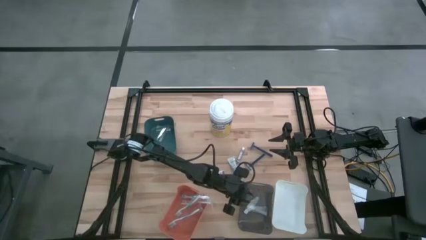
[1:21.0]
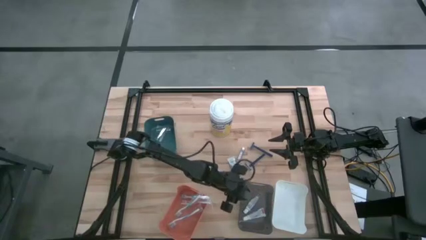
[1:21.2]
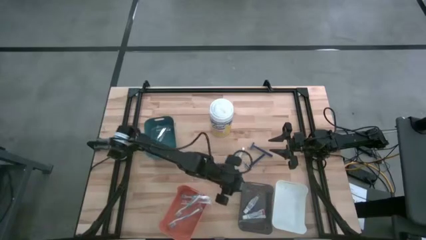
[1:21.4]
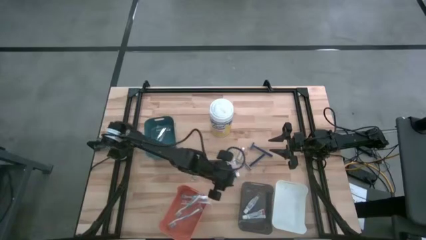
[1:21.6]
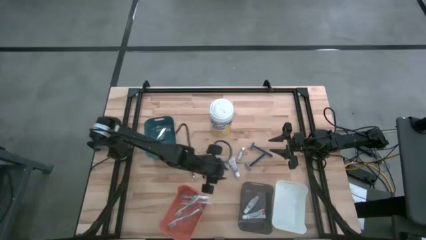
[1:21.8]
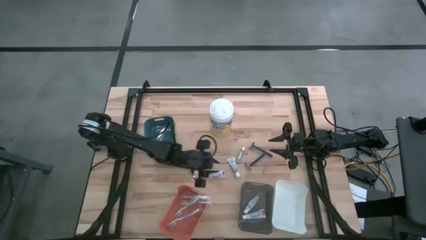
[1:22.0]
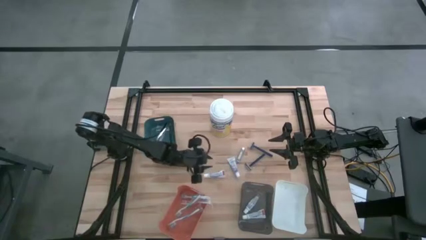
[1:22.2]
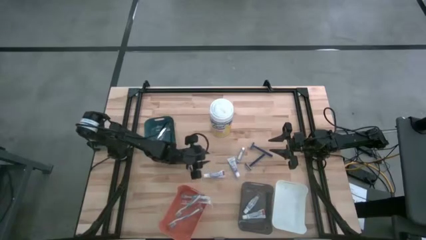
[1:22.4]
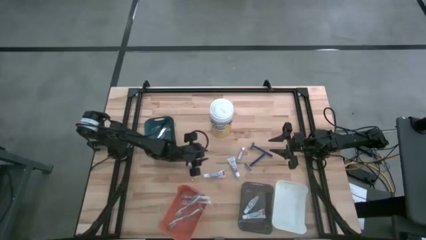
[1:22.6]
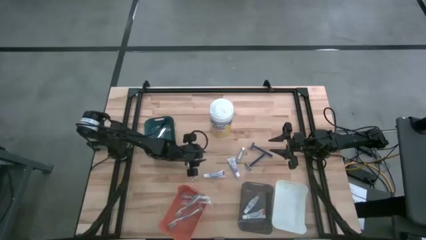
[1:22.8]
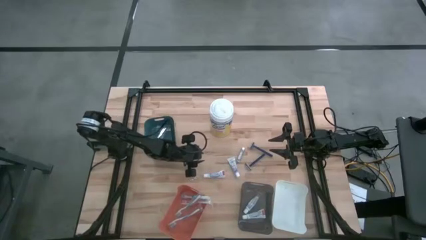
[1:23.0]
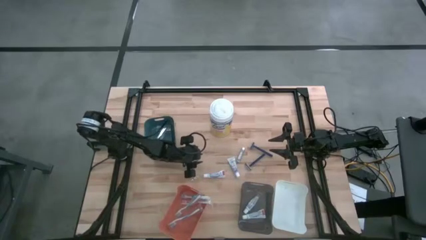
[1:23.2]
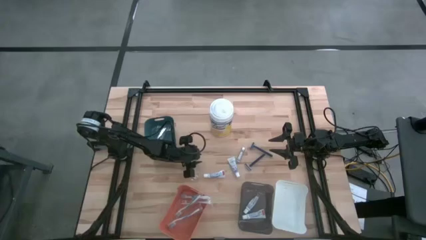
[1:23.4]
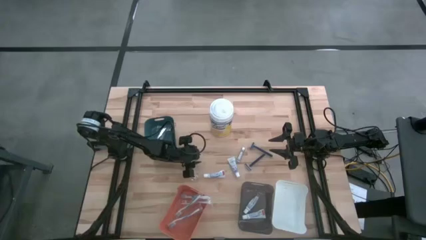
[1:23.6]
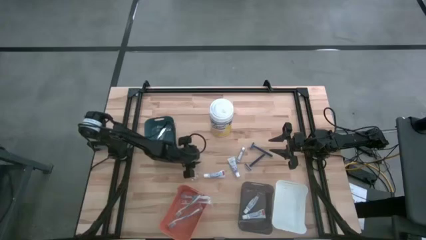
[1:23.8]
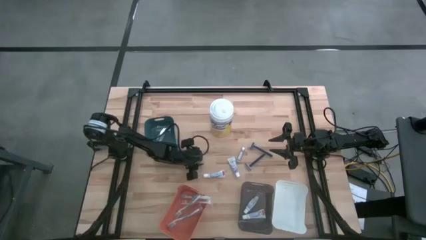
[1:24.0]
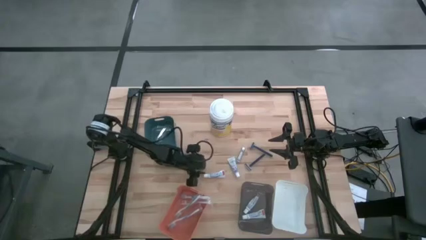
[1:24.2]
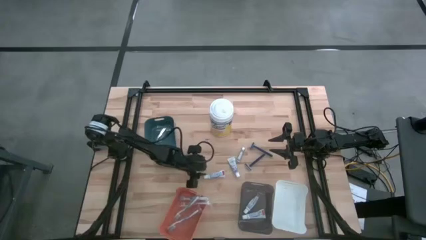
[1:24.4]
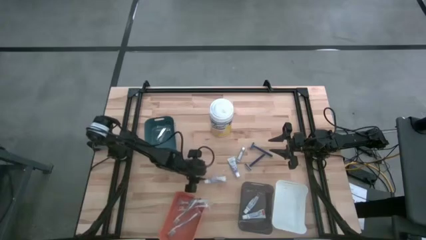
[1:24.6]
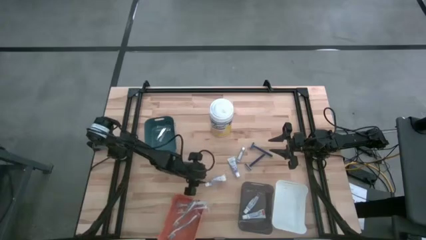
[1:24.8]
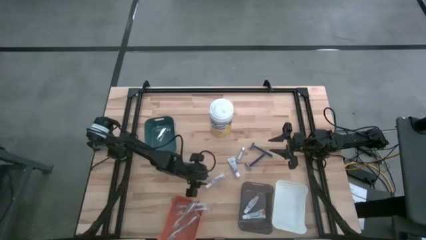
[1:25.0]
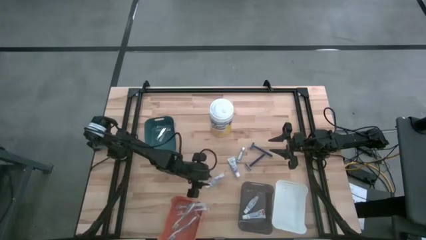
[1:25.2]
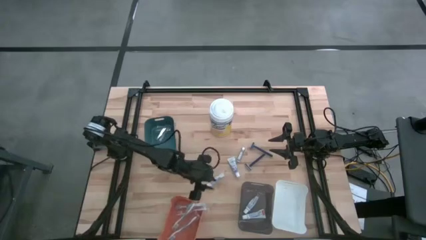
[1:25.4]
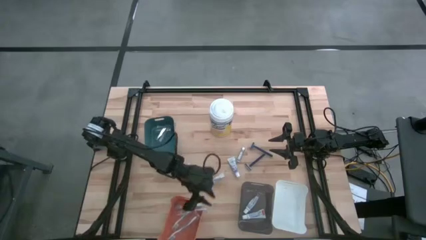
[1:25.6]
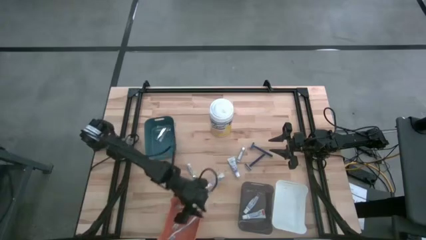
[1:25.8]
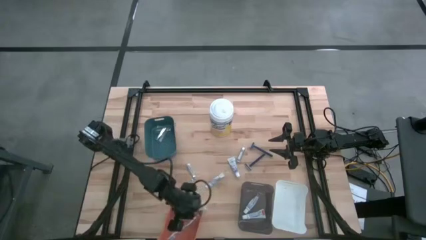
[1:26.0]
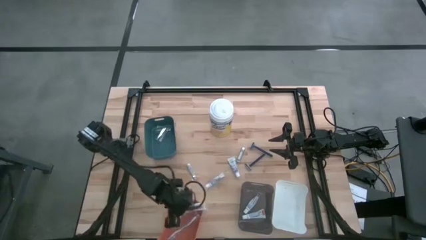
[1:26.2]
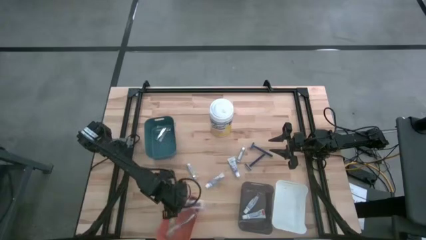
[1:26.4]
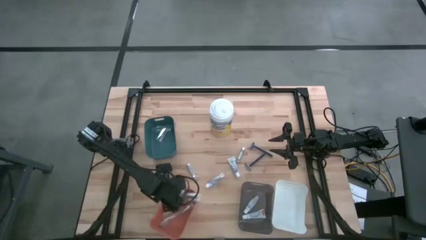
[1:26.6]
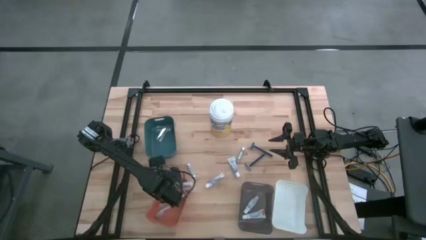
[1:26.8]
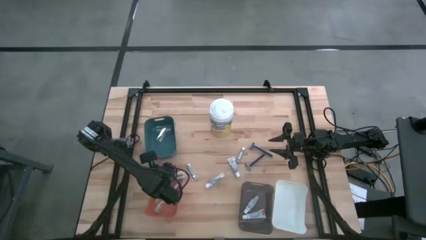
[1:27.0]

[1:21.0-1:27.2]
Task: Pick & Place Travel size toiletries
Adjust the orange bin

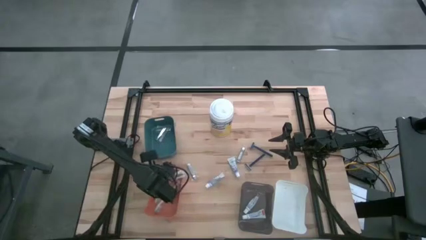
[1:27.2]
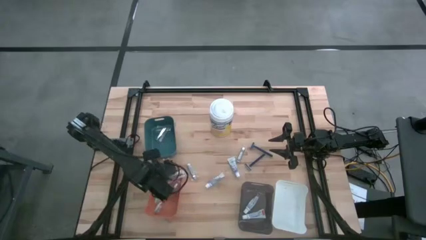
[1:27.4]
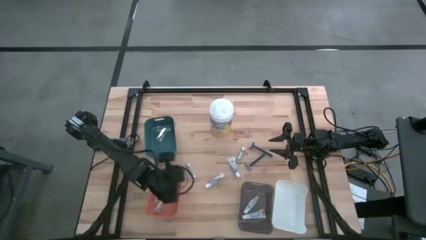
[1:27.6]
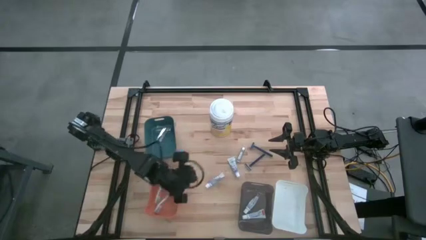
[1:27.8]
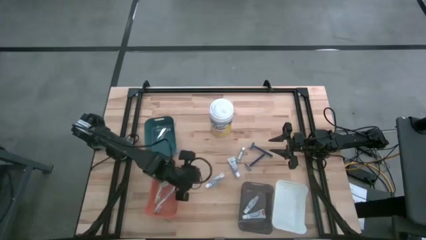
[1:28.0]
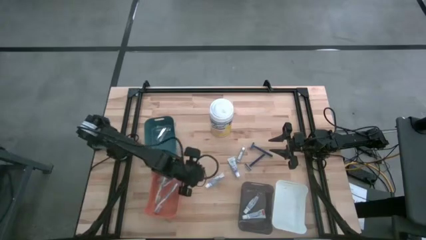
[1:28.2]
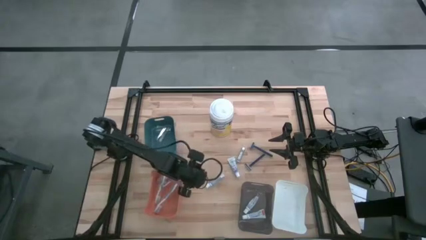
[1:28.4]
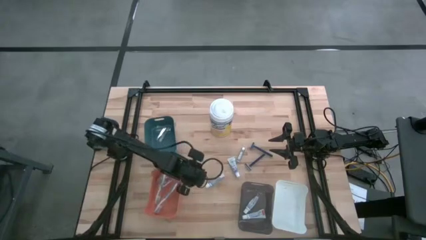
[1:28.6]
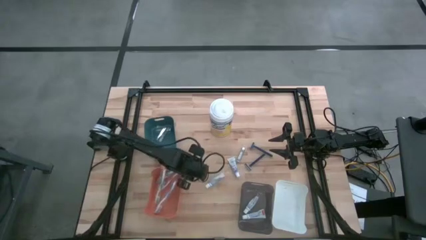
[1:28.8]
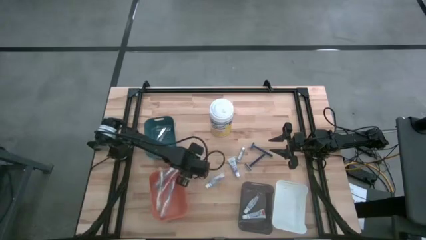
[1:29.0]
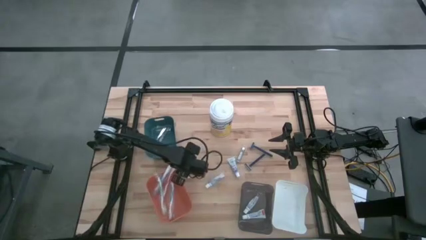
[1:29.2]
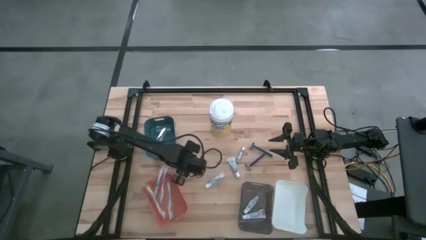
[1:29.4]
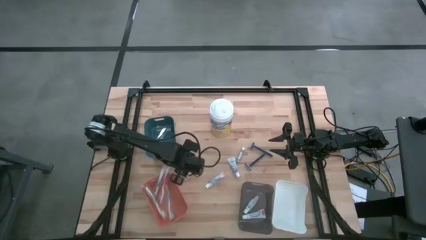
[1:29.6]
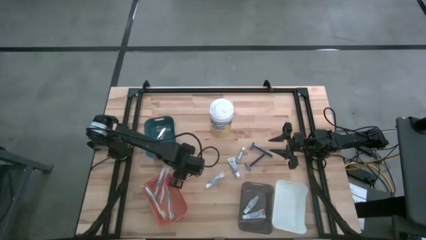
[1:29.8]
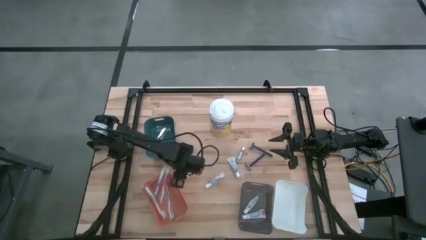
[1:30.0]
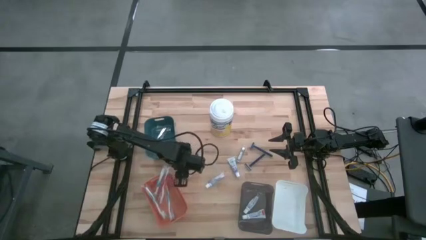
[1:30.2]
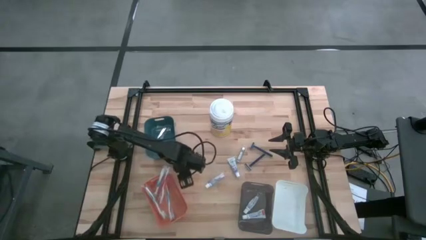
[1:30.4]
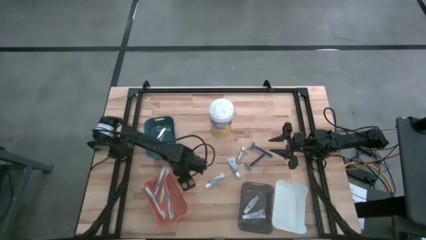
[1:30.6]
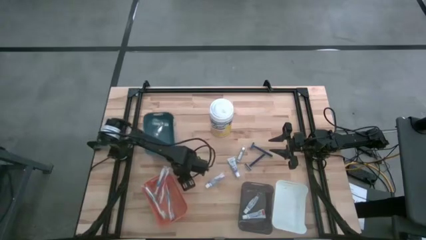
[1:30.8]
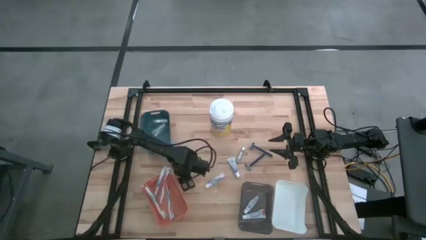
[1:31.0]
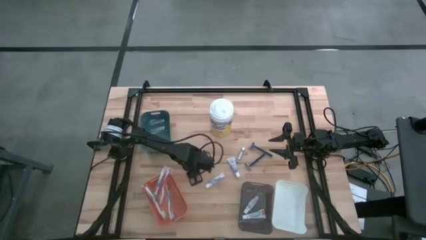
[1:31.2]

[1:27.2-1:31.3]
Put the silver nail cutter into the blue bin

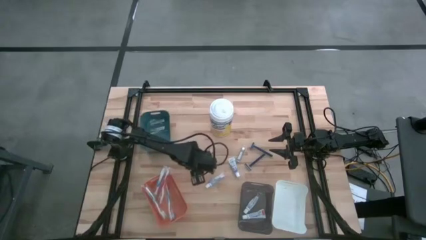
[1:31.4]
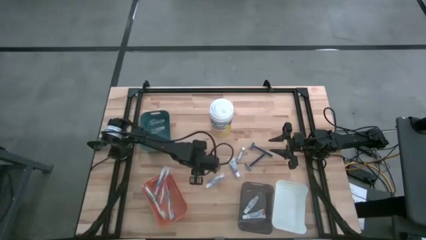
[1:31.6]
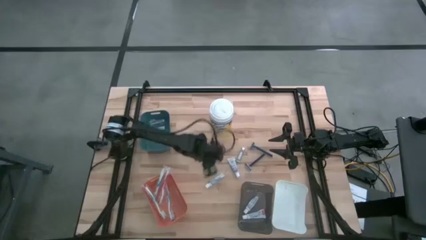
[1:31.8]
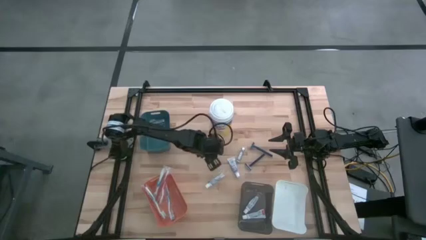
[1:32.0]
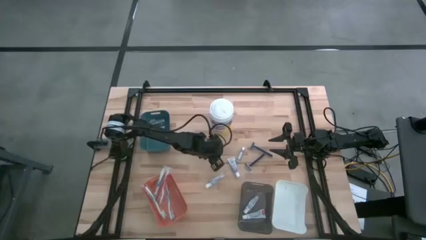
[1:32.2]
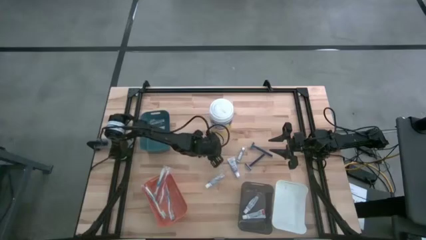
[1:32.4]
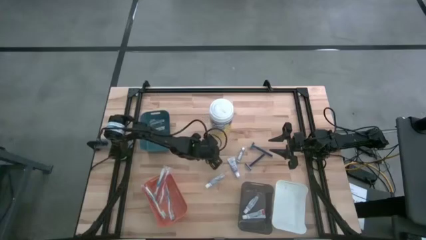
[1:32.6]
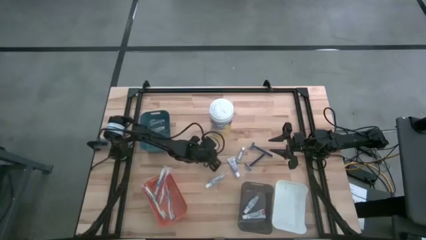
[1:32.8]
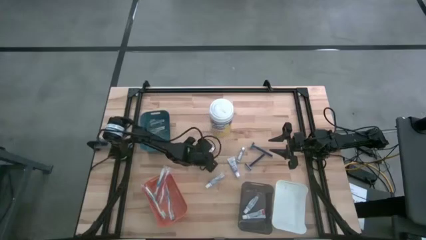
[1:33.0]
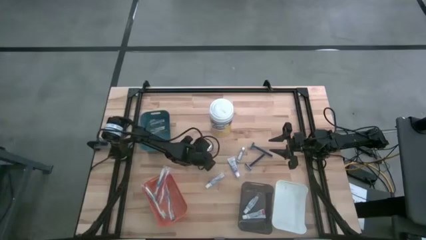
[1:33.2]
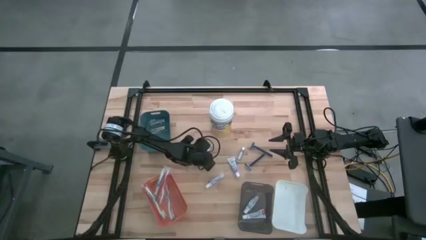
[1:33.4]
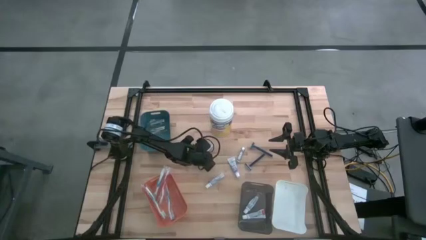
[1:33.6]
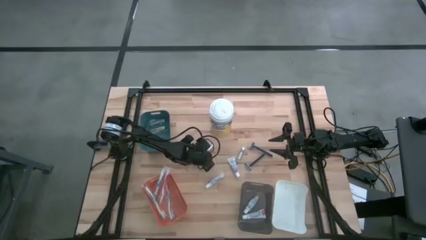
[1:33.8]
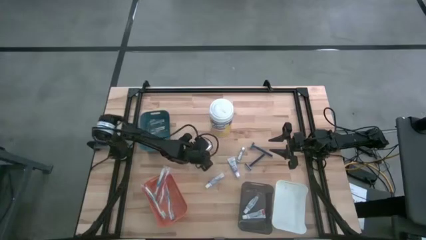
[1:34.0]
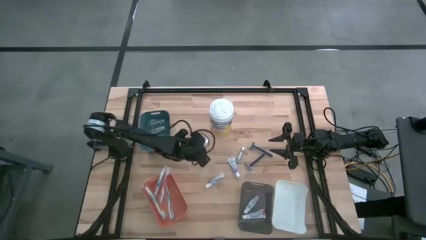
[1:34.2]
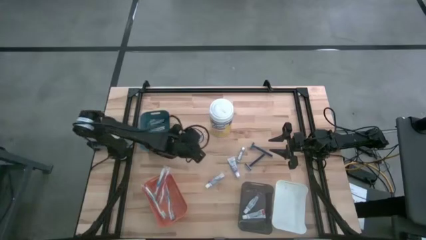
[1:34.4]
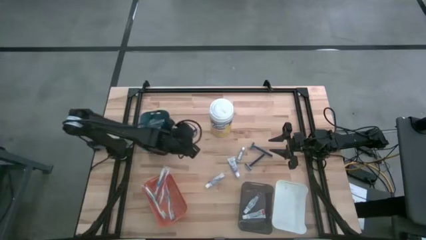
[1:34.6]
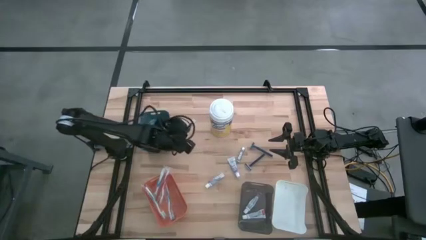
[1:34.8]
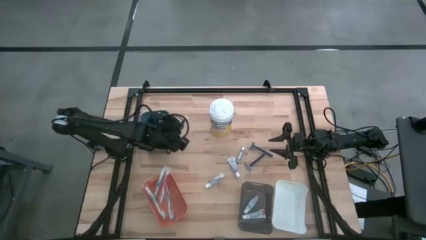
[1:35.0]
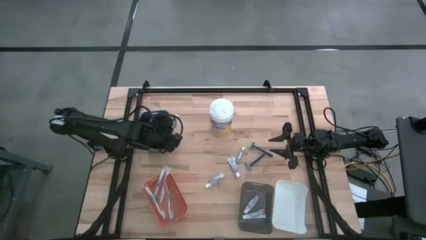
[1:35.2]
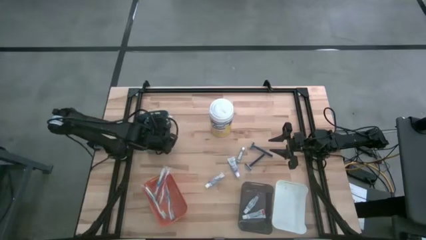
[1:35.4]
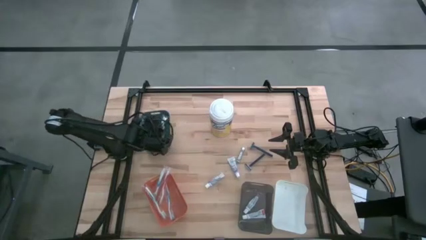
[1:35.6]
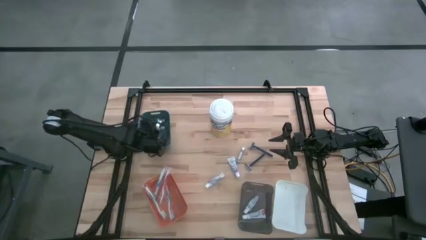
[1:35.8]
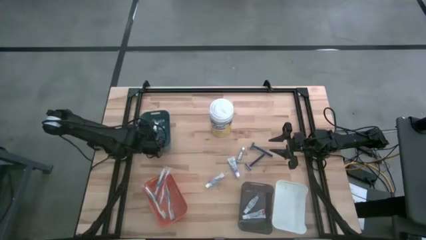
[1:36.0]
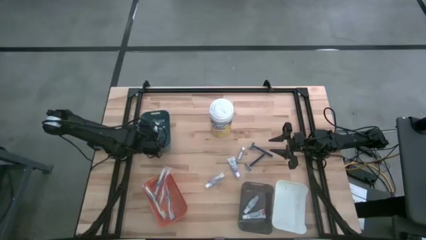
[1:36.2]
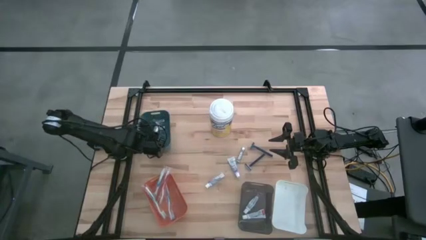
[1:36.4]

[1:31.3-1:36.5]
Put the silver nail cutter into the blue bin
